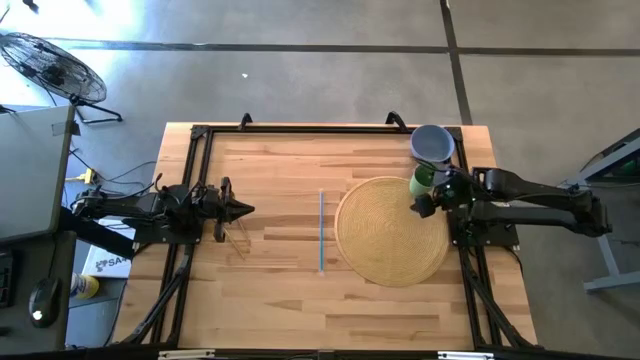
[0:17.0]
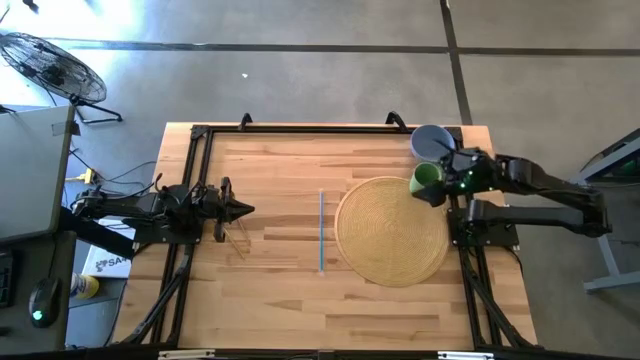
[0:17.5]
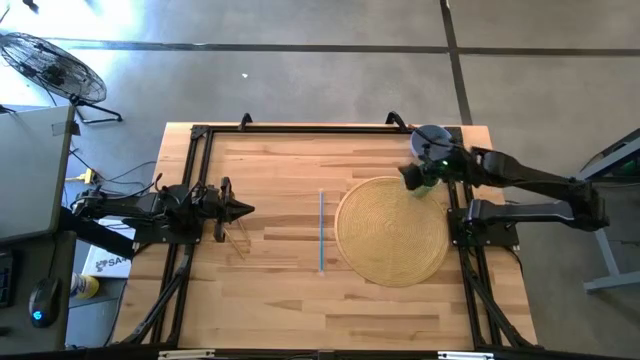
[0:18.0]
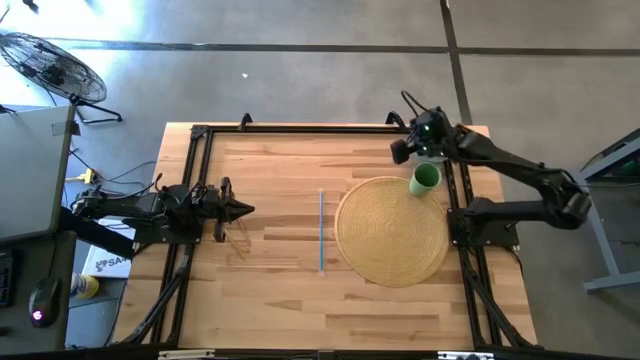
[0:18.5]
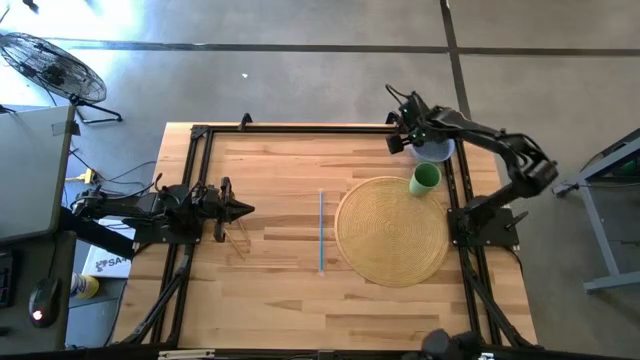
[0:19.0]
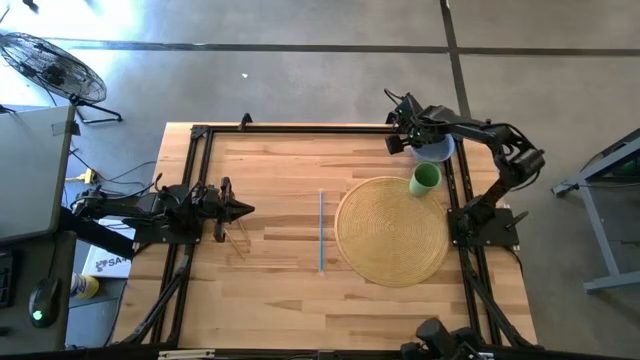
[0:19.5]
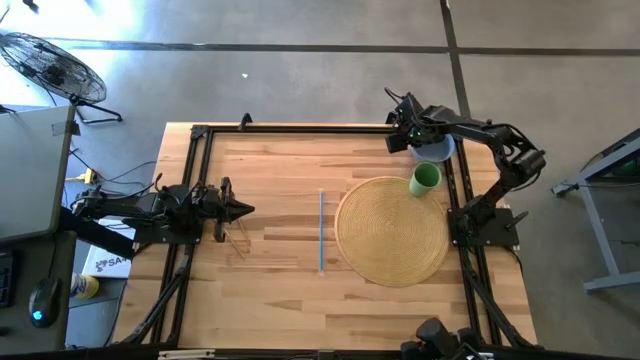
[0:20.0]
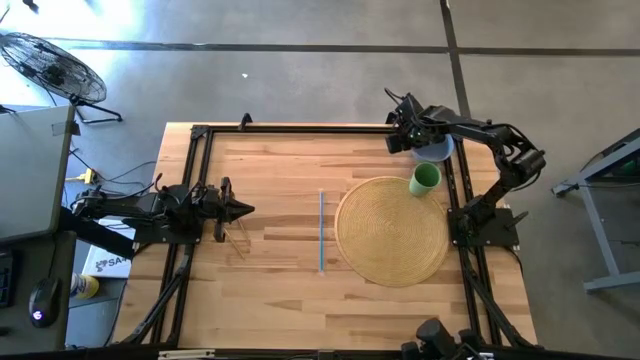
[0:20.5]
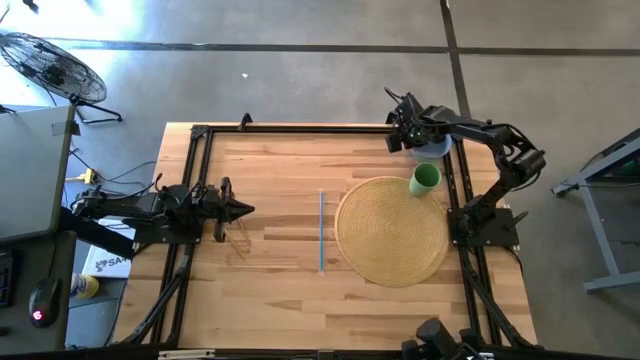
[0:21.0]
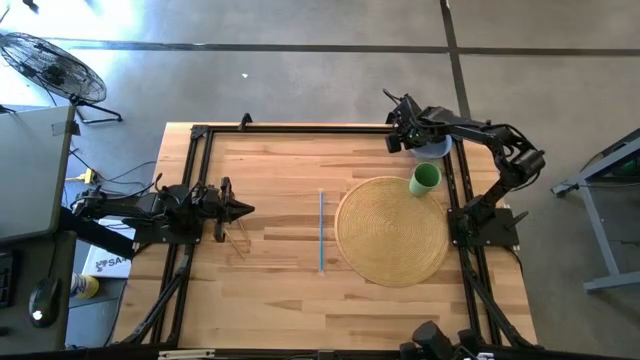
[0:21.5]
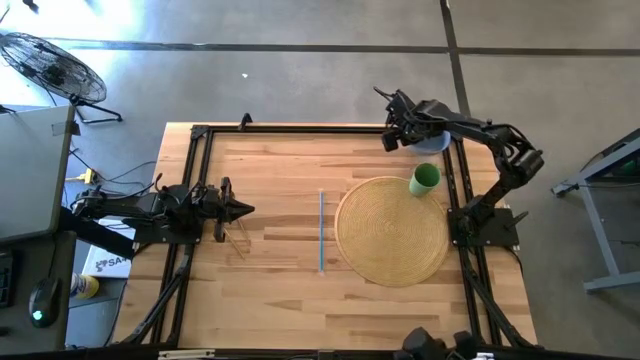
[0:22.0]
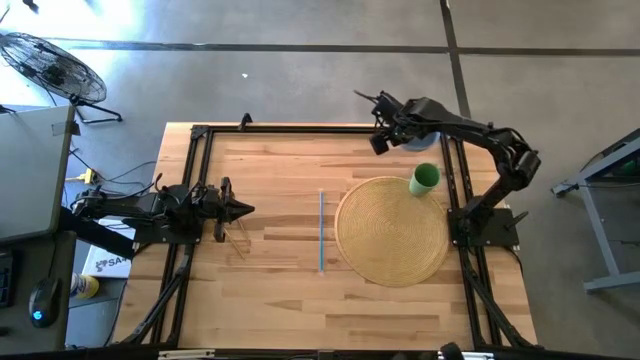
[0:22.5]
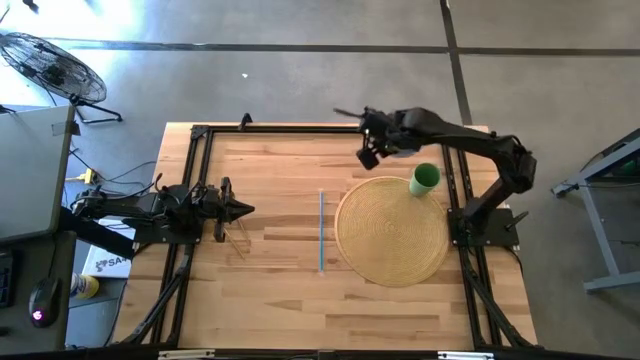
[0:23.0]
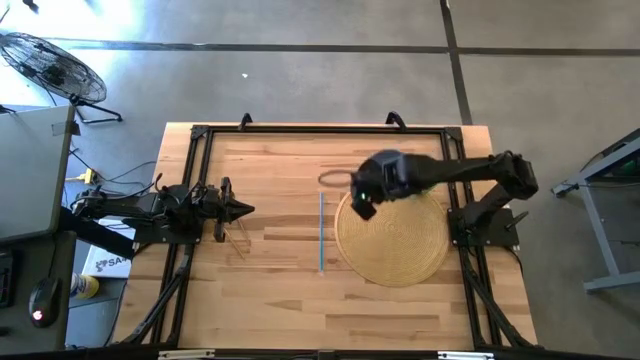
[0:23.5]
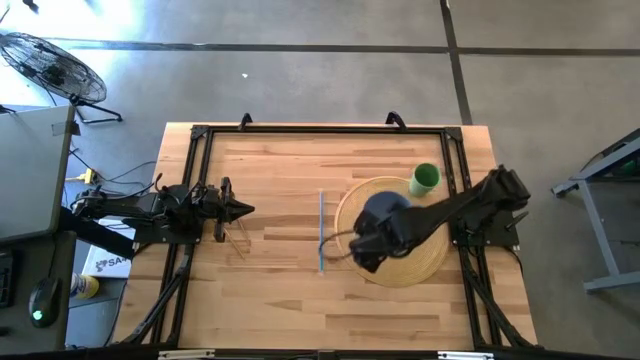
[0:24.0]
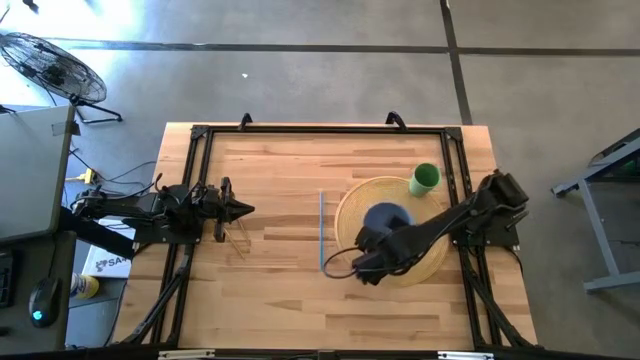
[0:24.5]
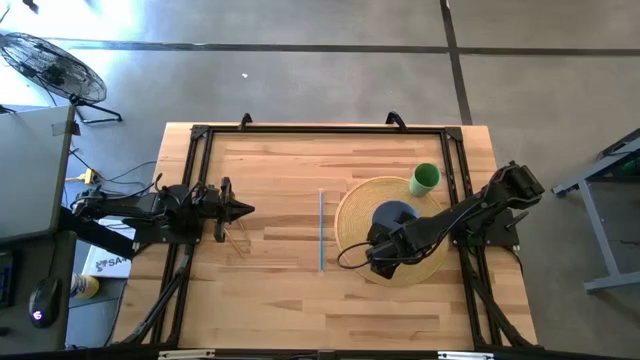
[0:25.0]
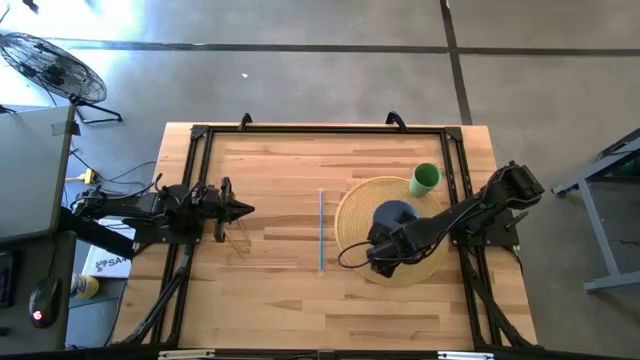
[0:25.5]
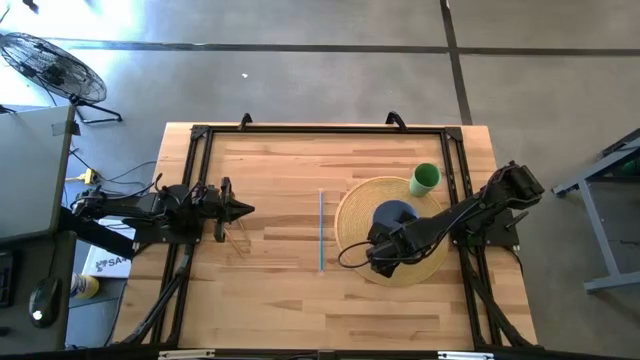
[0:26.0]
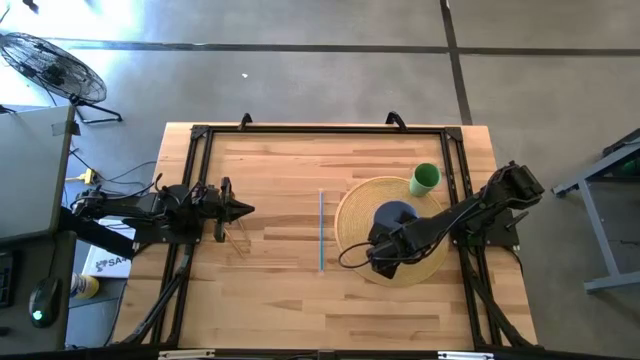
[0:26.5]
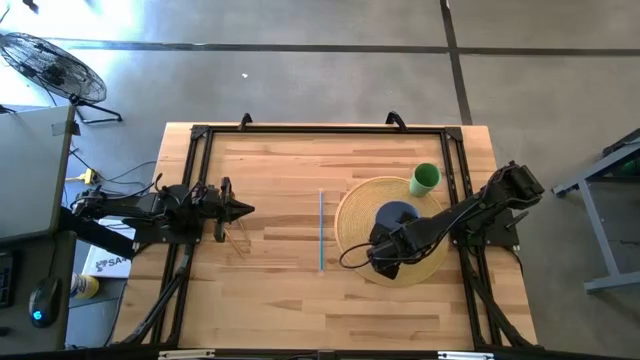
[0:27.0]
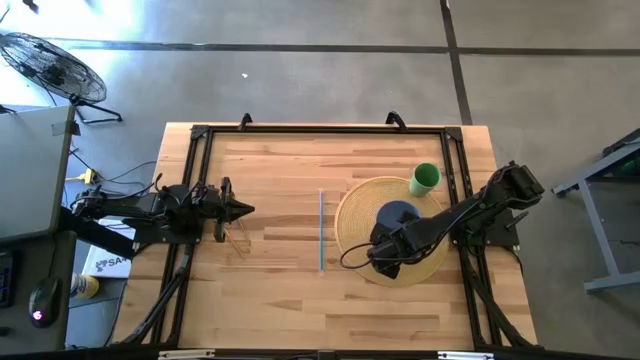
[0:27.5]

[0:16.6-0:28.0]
Task: Pick & Place Utensil
Put the blue bowl on the table mat to the middle of the brown table mat

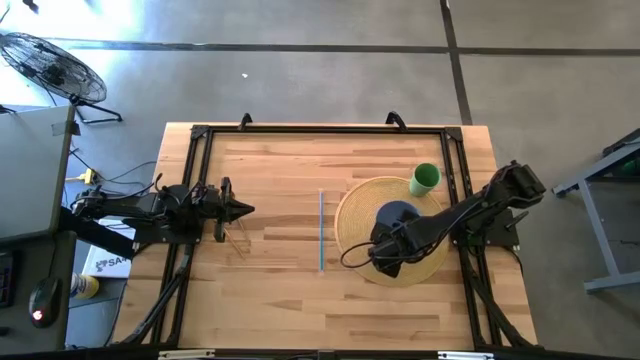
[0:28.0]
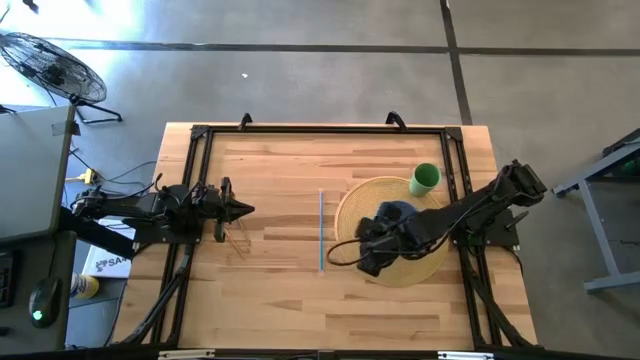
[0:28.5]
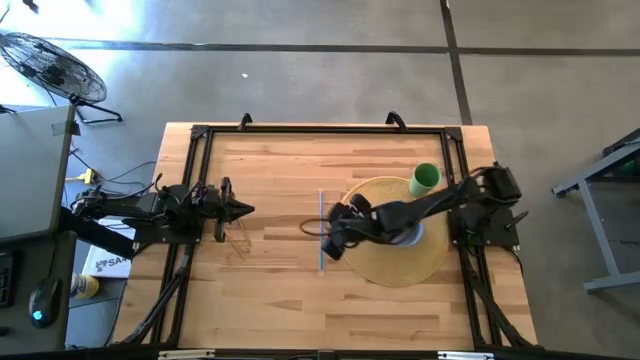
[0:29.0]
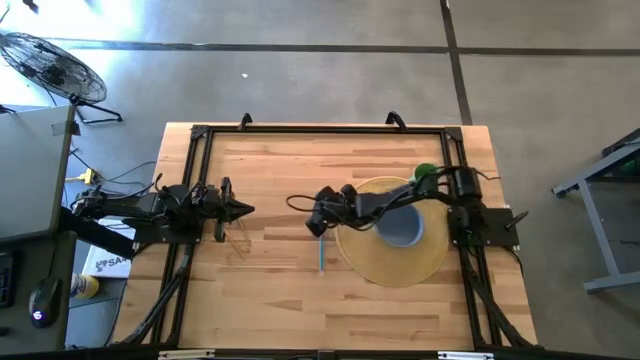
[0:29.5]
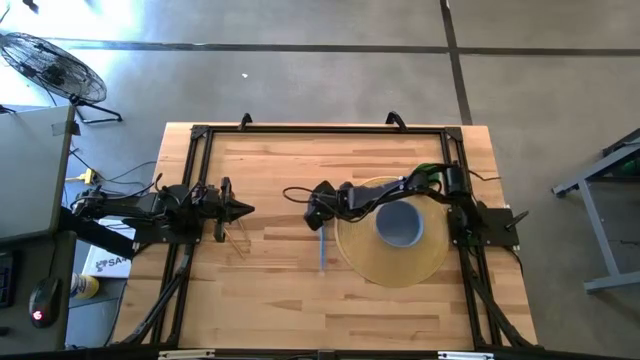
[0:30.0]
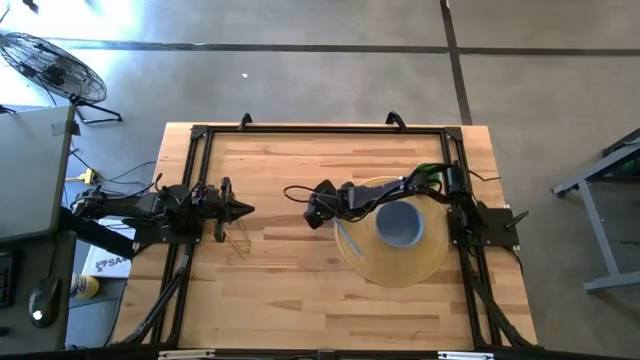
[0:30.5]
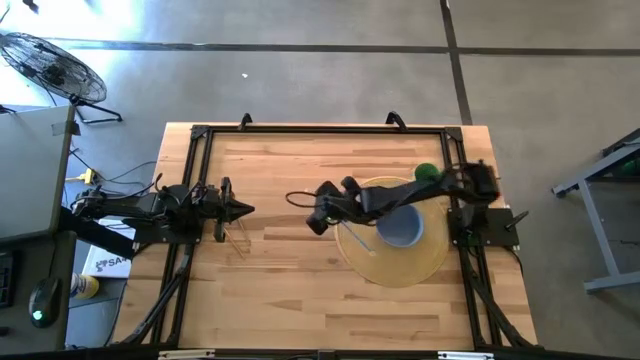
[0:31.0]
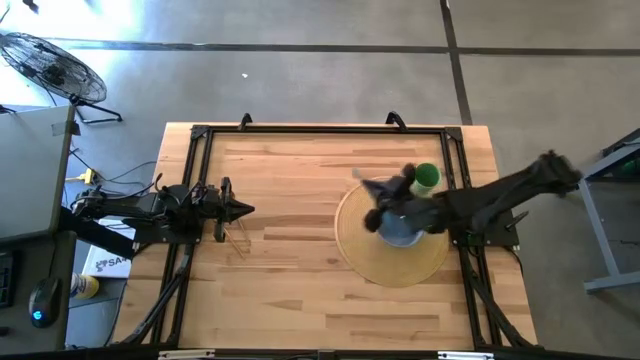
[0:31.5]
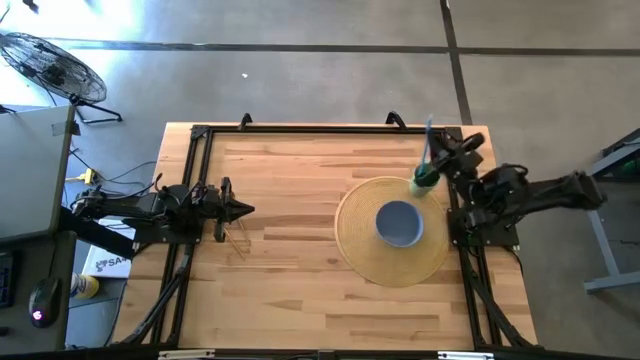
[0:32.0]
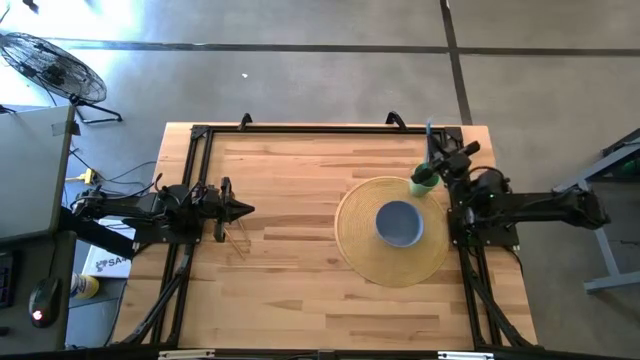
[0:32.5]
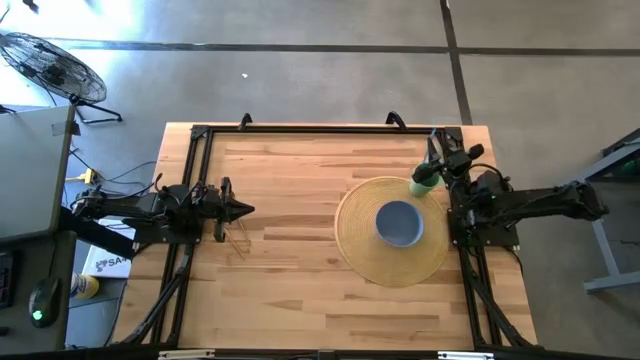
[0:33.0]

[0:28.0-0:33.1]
Put the blue straw on the green cup

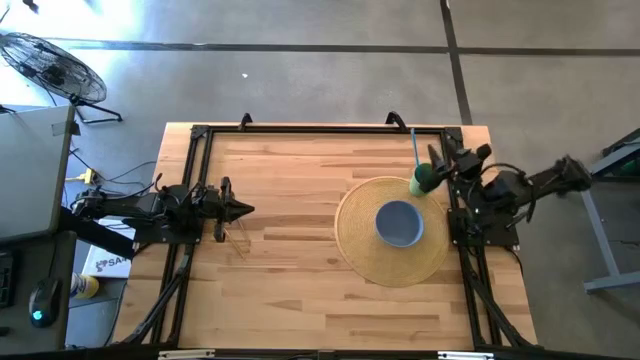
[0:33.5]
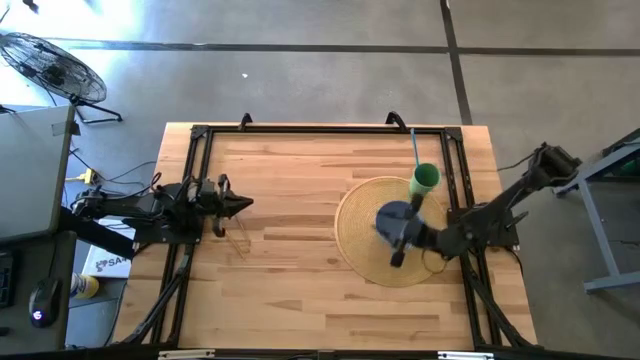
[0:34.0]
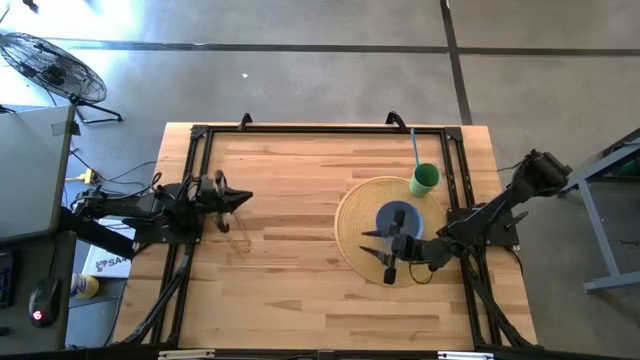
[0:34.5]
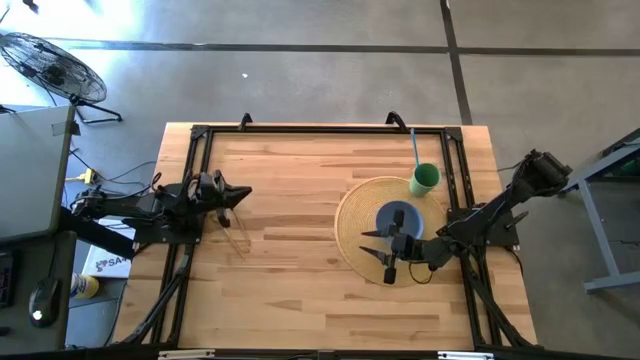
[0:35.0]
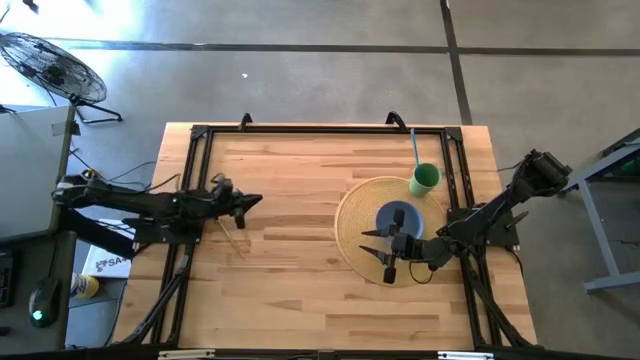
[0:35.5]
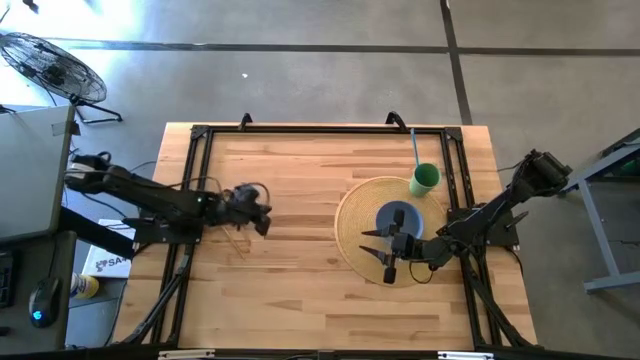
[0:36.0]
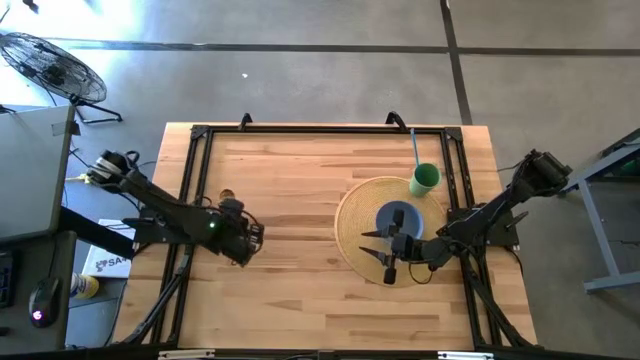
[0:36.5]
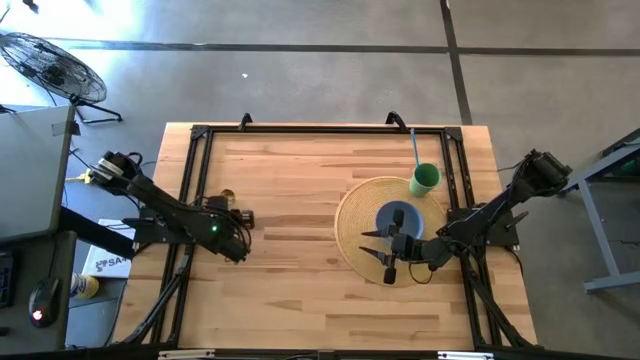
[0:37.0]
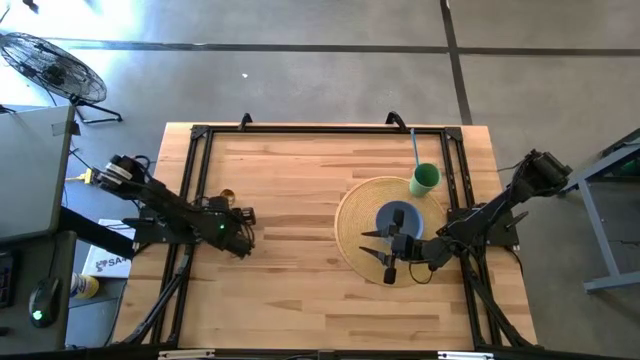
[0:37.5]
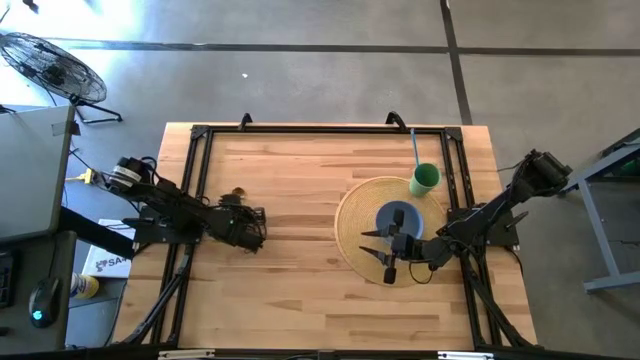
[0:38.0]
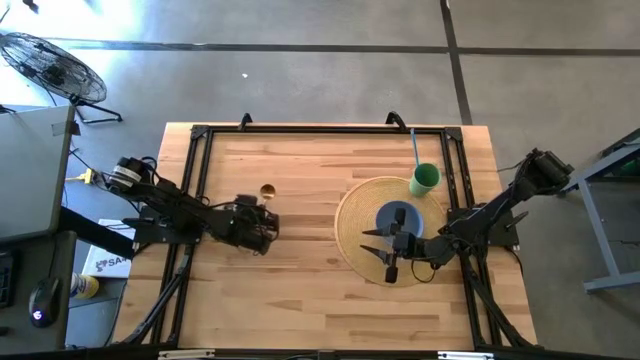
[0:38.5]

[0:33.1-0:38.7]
Put the spoon into the blue bowl

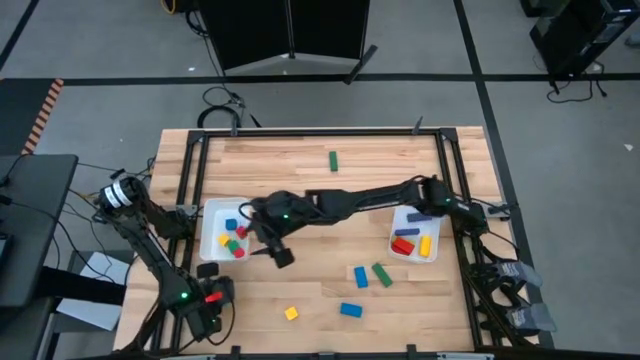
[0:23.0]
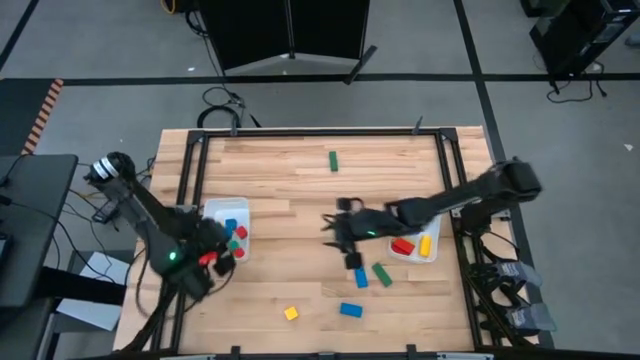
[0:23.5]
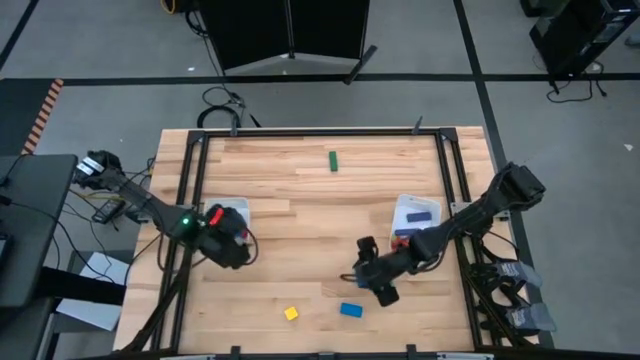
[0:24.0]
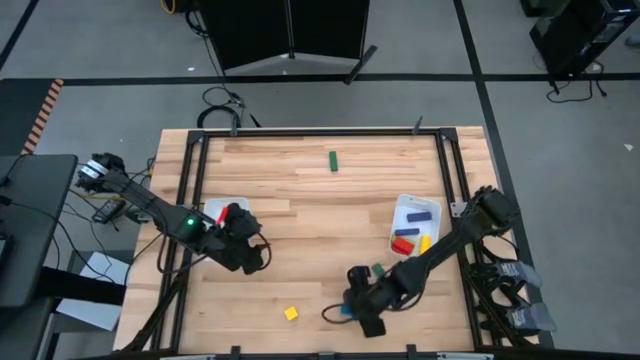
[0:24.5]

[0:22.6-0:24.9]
Task: Sort blocks by size
Put the blue game piece into the left bin
